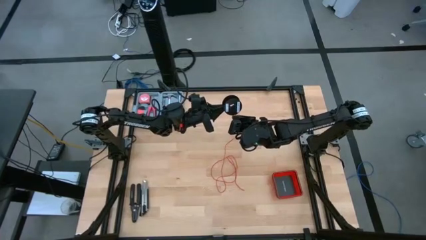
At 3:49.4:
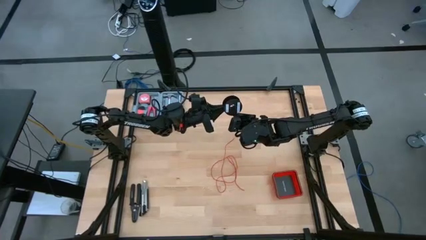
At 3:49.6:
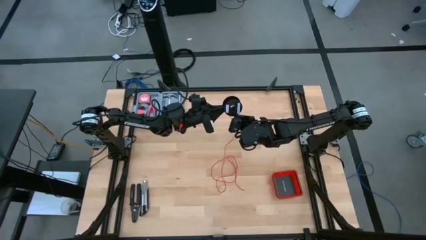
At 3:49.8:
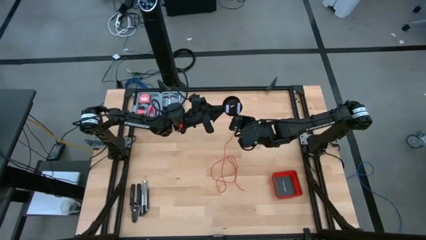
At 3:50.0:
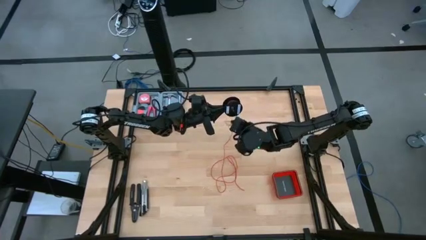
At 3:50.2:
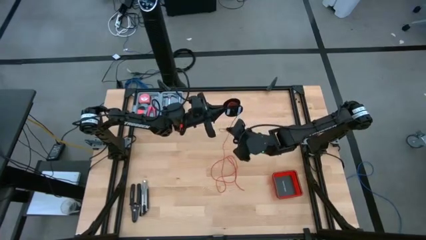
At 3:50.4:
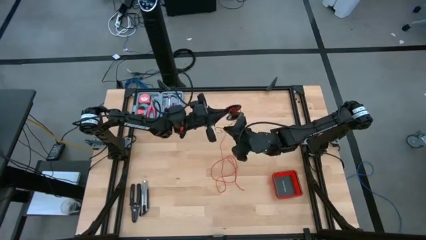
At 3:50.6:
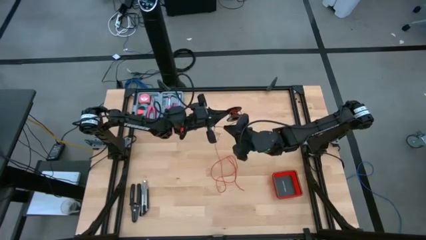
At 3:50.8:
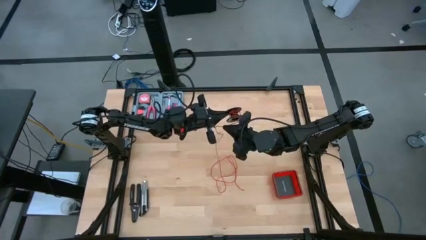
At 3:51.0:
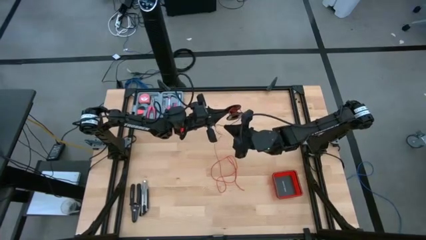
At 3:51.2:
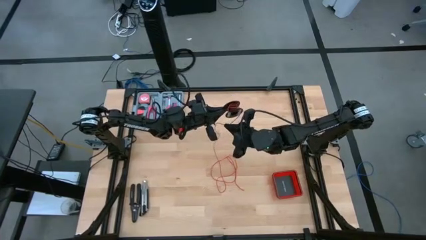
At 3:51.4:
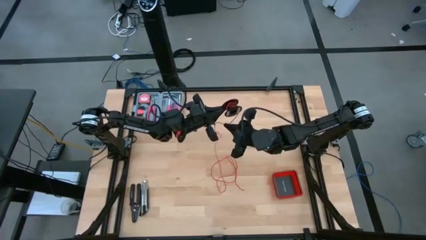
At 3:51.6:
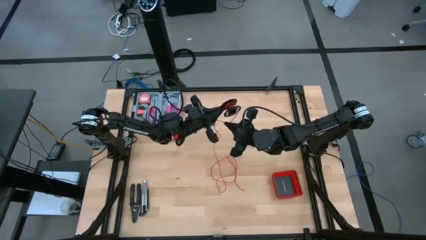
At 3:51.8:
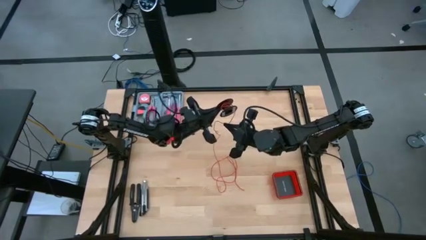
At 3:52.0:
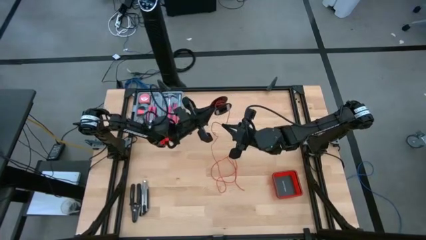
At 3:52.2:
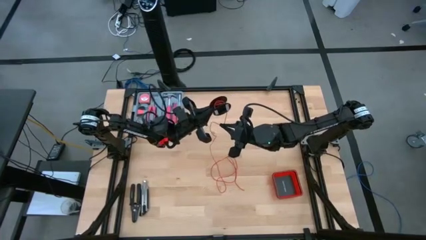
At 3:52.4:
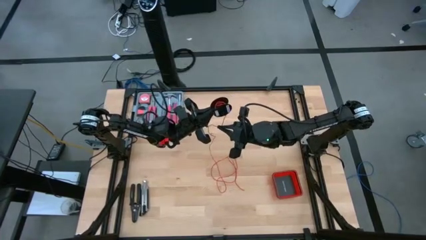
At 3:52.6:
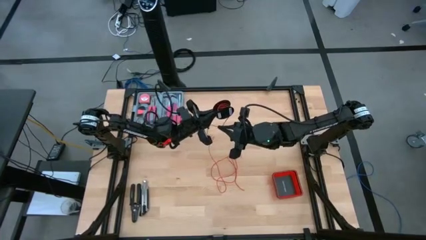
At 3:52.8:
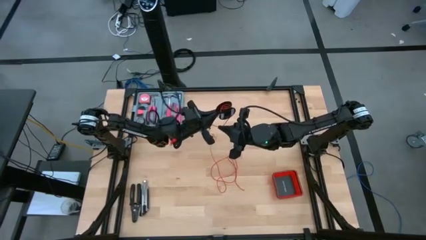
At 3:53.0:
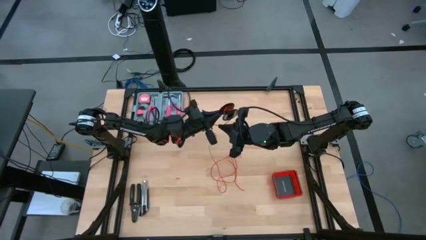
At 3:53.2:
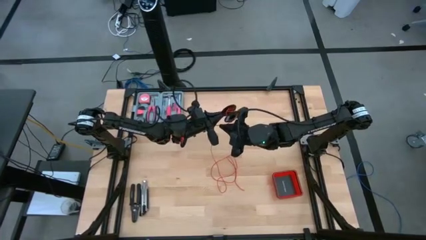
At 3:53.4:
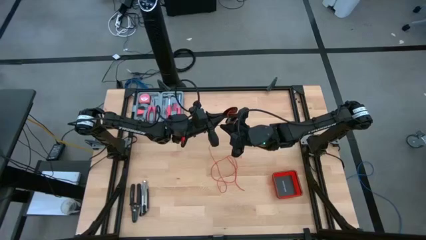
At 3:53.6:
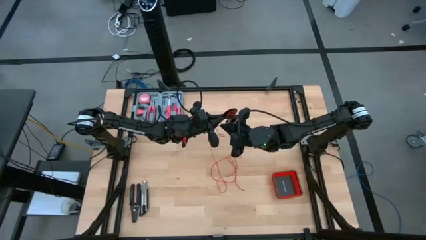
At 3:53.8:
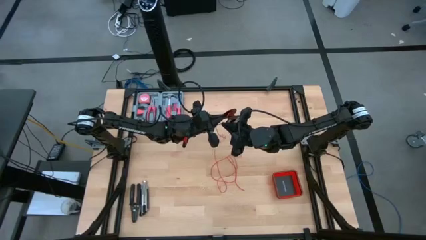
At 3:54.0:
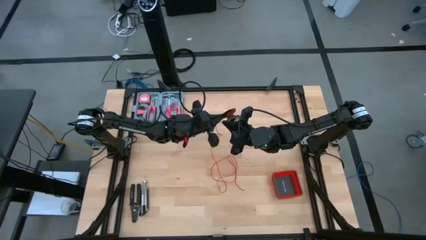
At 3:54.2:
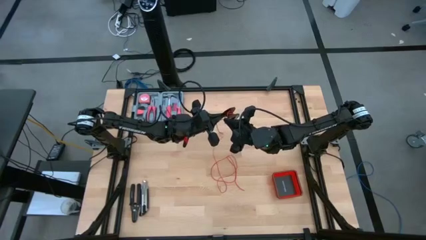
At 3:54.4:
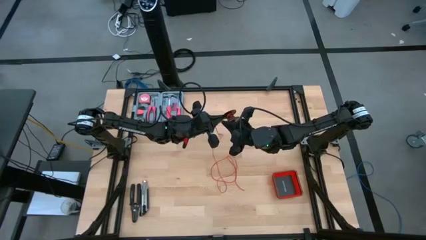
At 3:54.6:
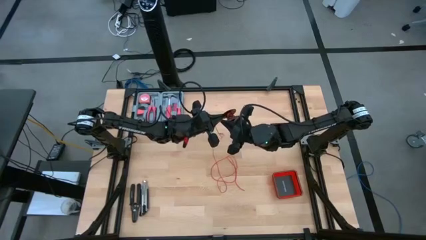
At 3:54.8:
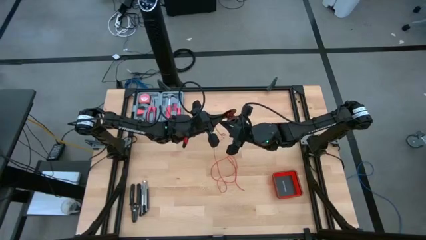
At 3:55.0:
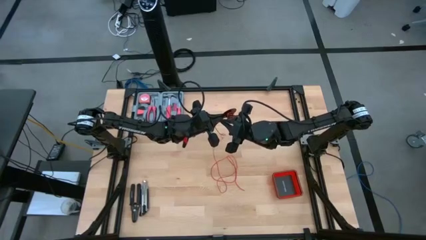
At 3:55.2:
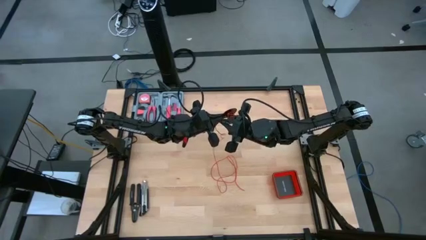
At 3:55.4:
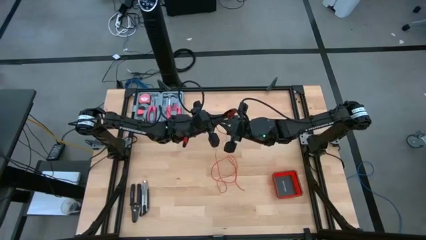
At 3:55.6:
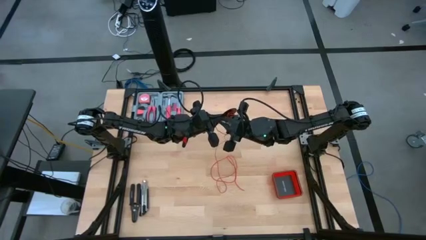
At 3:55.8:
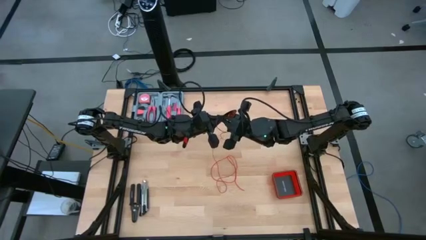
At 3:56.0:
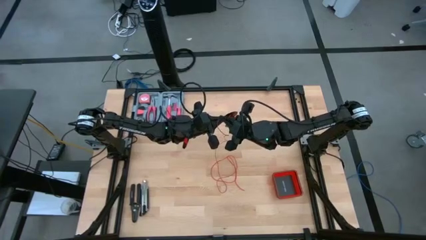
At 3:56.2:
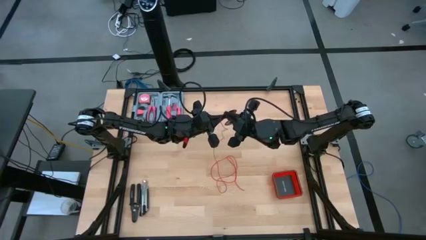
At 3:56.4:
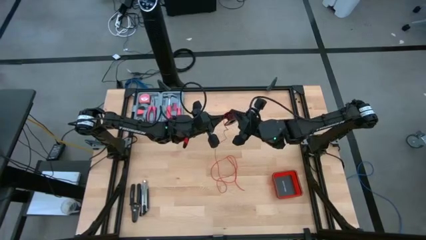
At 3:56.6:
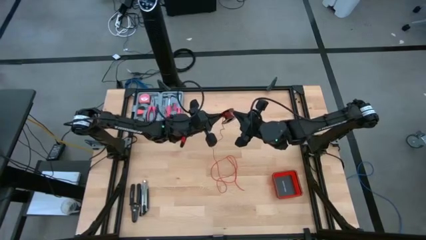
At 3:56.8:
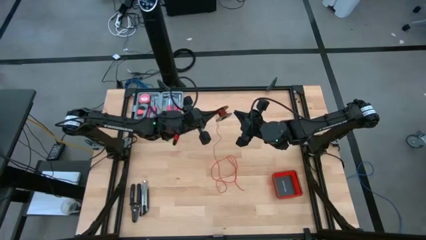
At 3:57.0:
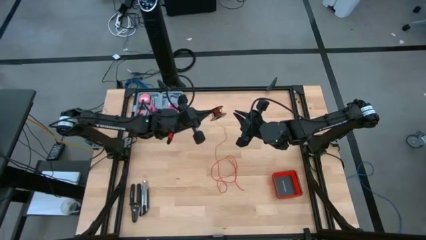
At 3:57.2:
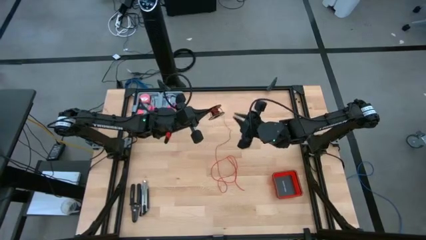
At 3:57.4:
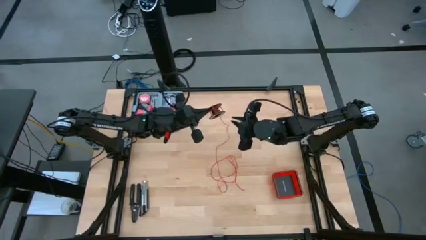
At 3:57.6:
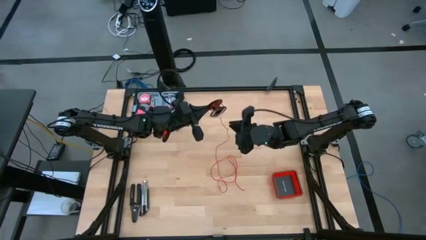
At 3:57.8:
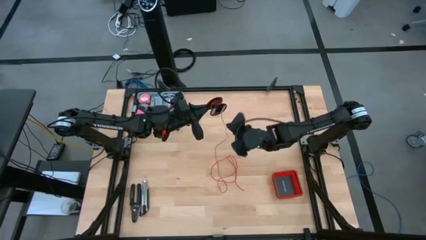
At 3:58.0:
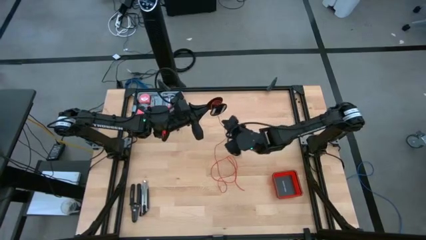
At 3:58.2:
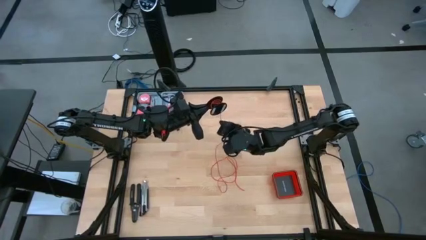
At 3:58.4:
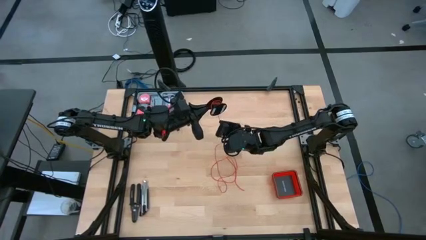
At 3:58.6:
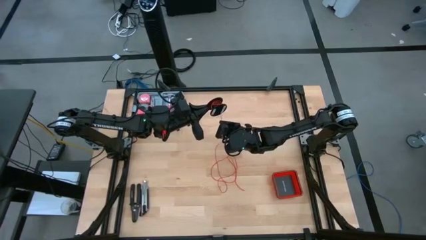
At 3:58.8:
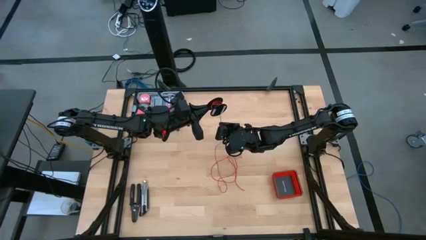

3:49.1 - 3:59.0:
Task: Coil cords
Coil the red wire onto the spool

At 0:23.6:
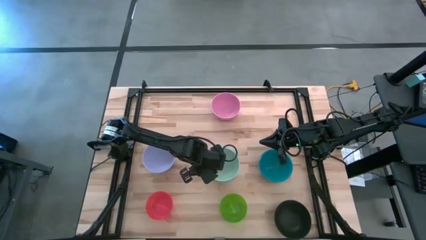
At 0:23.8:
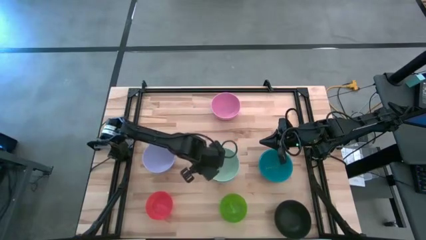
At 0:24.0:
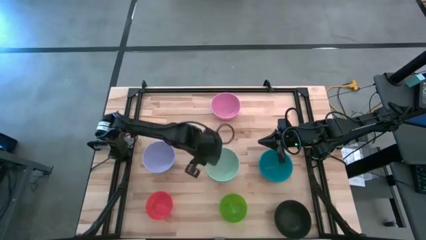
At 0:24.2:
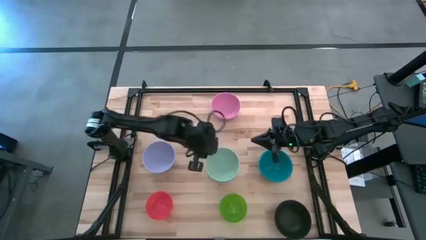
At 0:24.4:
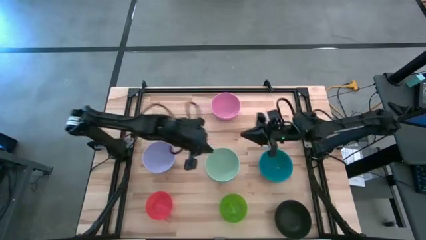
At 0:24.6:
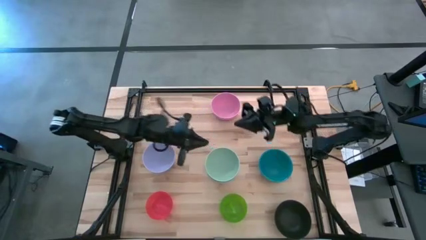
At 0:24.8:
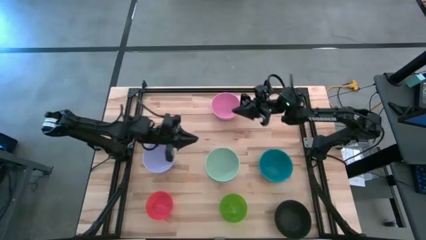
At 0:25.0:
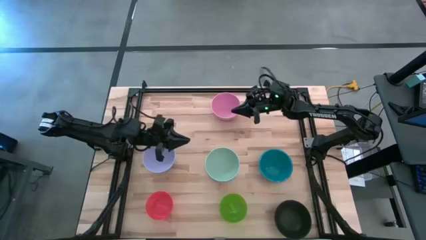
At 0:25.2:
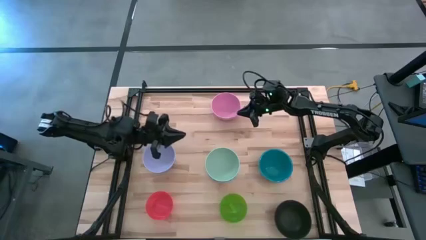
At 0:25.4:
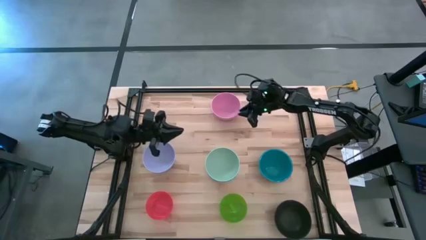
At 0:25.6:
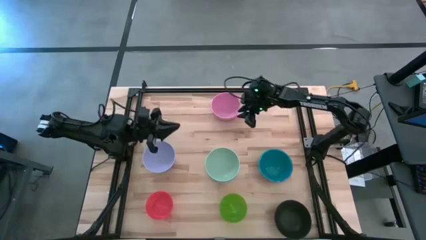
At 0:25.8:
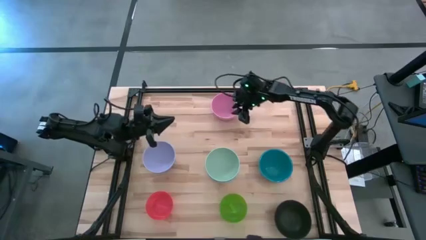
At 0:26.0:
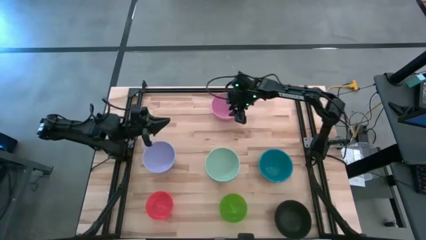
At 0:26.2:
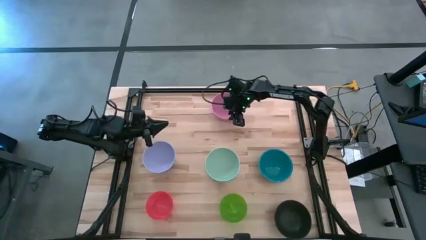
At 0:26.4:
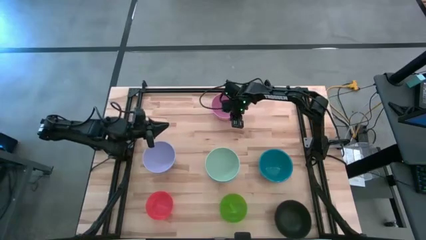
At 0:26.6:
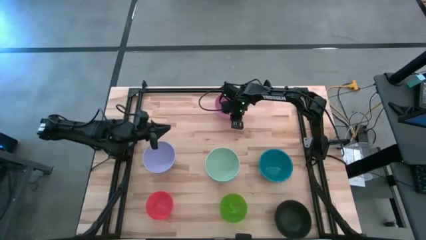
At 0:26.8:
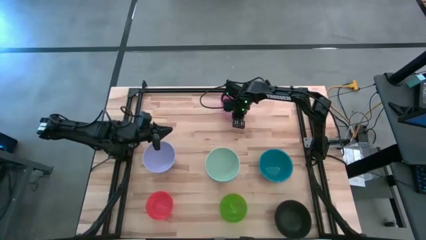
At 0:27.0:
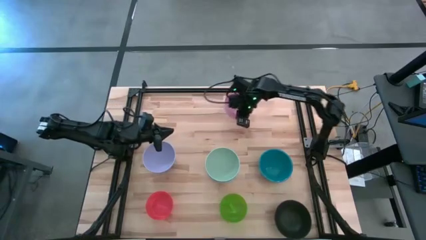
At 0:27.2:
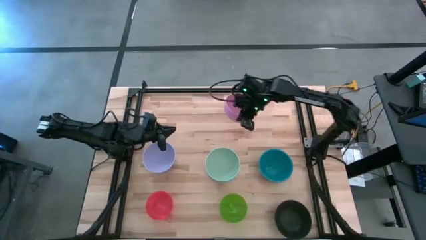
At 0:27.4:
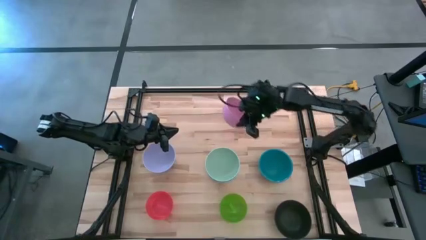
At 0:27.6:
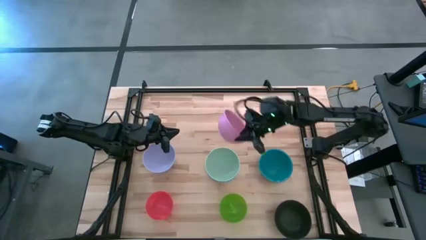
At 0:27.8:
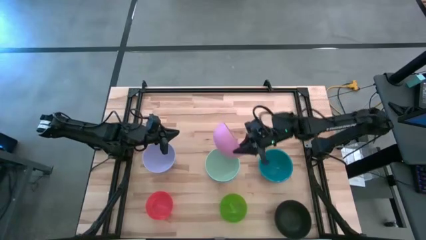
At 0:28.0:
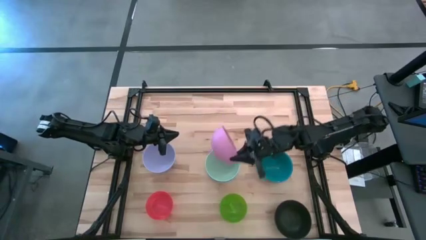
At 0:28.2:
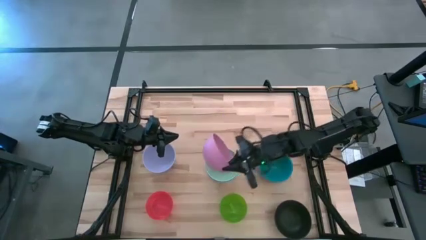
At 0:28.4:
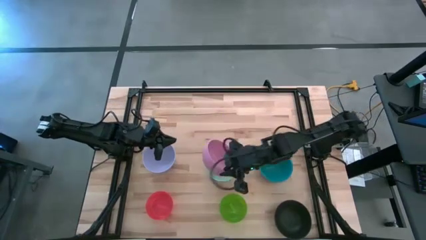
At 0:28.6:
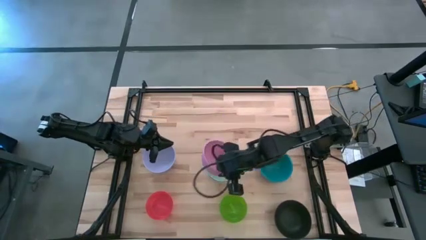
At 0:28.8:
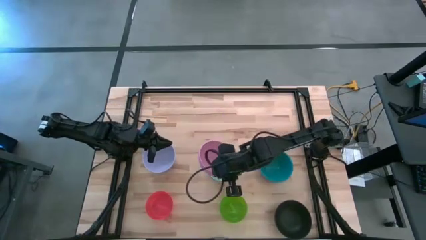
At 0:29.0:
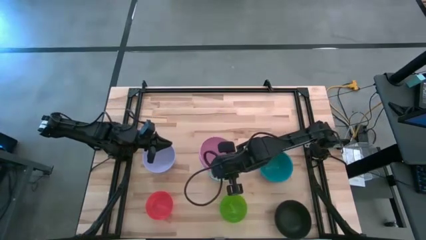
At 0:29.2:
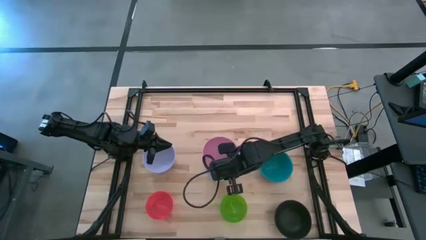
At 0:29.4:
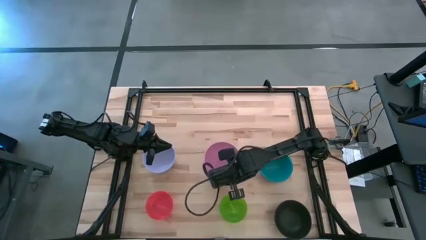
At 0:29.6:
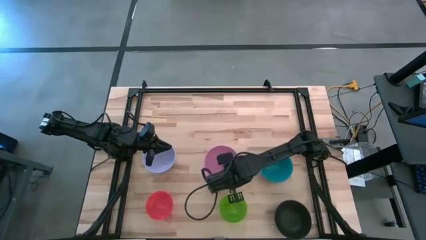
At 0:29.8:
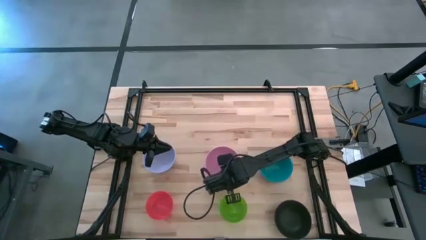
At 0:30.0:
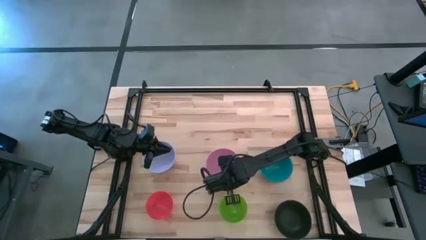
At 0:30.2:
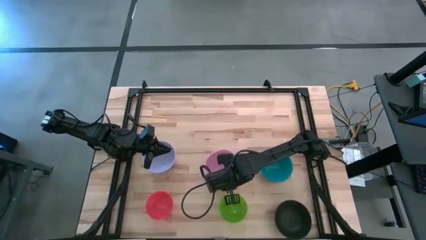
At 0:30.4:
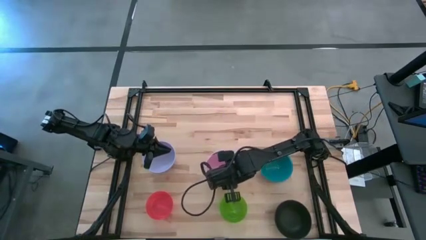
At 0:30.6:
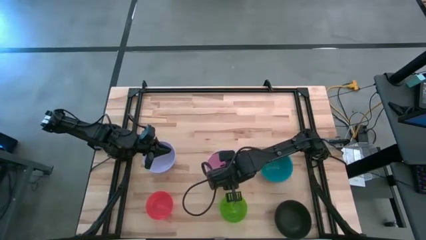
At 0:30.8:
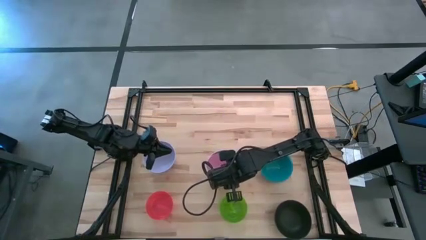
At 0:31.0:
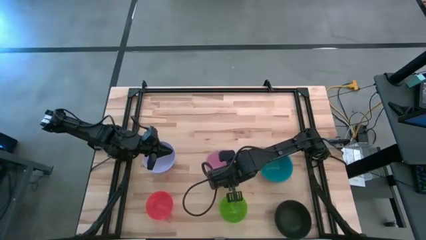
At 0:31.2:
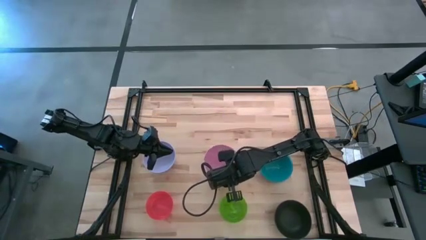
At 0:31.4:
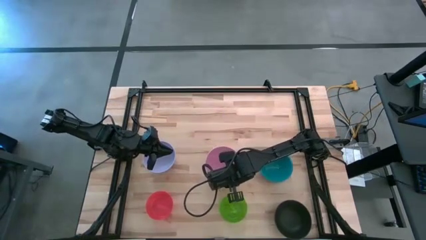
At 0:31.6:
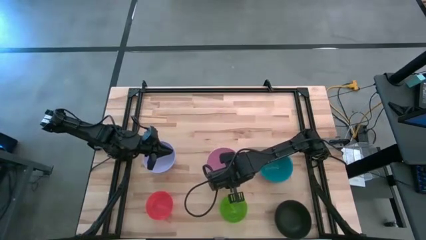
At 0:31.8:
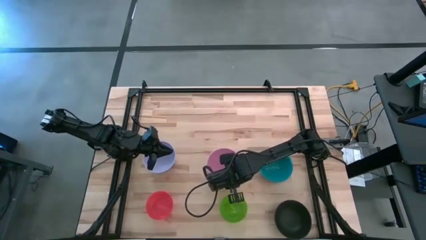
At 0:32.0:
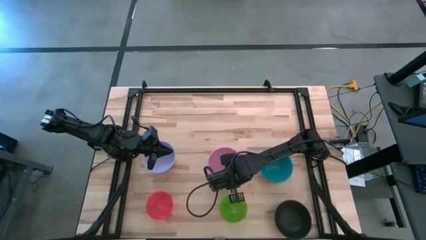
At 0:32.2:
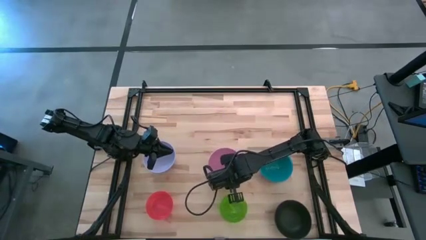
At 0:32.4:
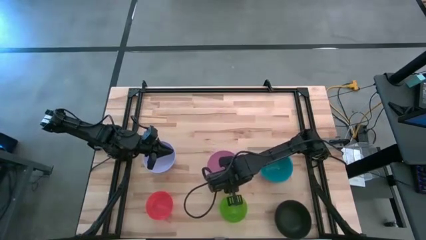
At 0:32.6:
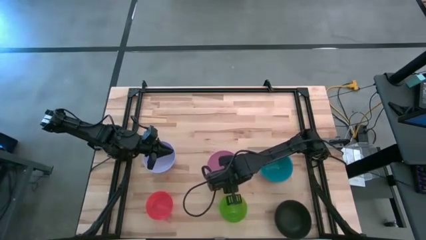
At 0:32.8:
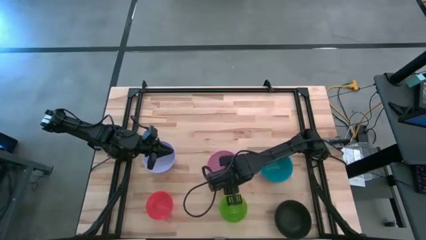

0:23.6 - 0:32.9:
Task: Nest bowls inside each other
Stack the pink bowl on top of the light green bowl
